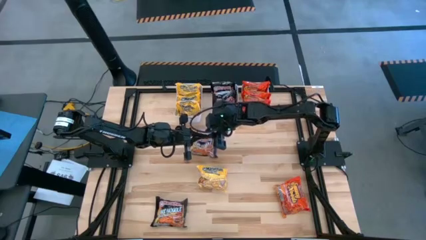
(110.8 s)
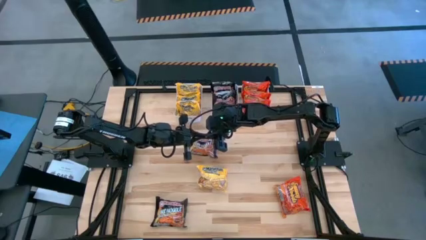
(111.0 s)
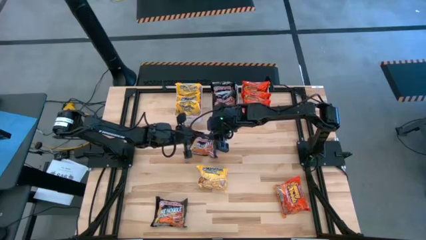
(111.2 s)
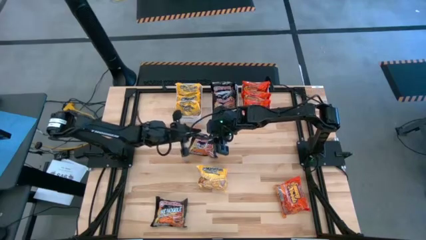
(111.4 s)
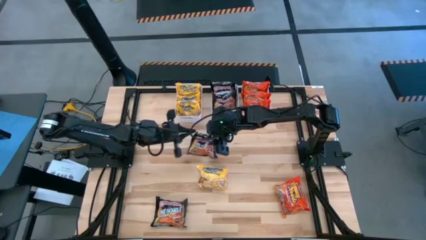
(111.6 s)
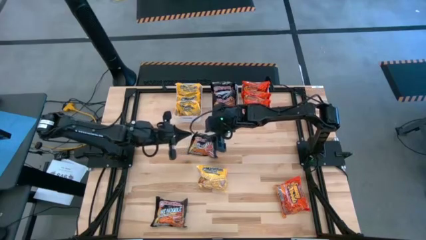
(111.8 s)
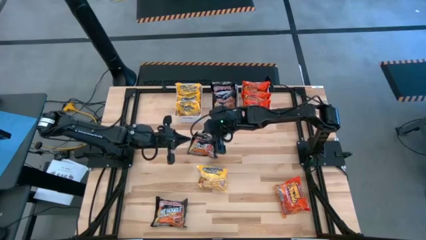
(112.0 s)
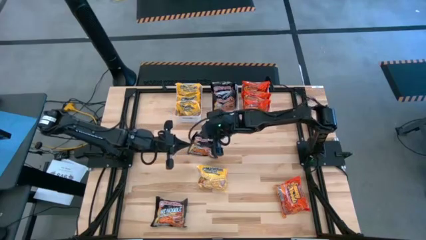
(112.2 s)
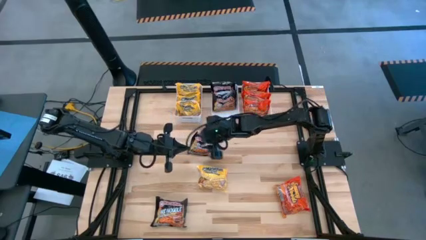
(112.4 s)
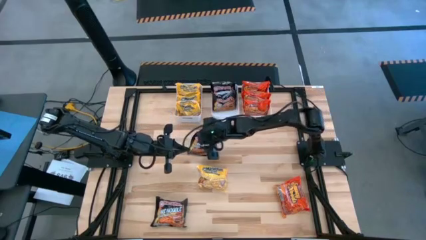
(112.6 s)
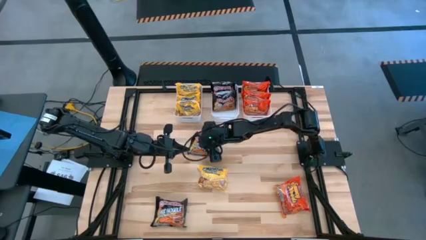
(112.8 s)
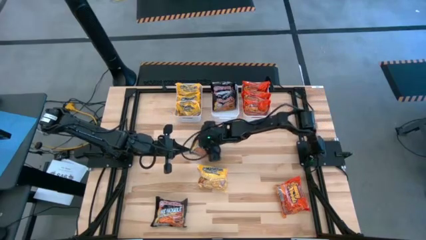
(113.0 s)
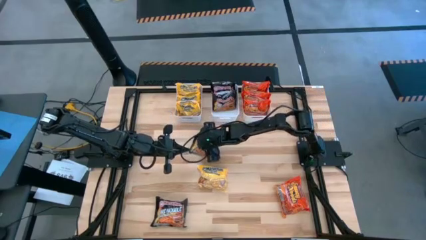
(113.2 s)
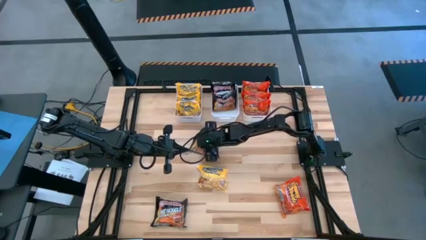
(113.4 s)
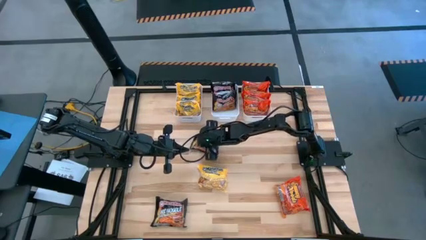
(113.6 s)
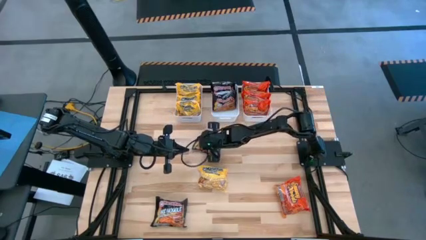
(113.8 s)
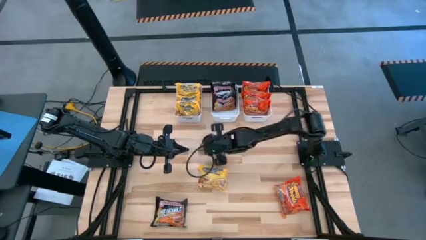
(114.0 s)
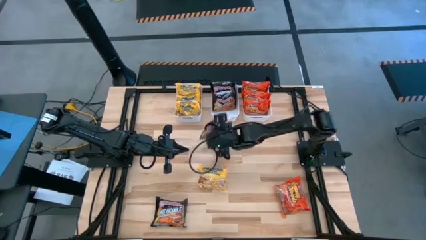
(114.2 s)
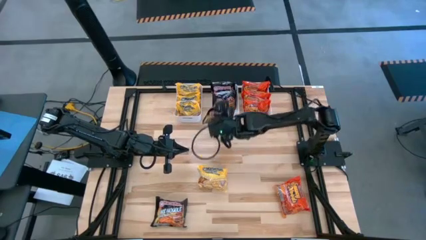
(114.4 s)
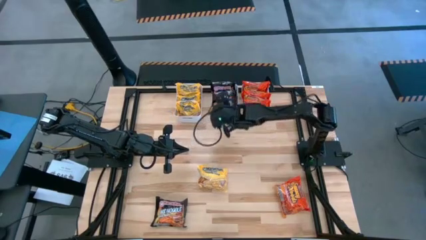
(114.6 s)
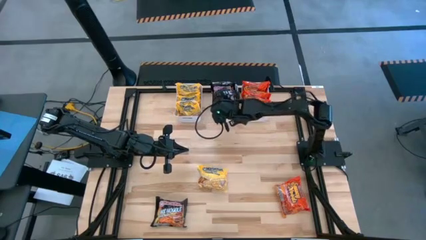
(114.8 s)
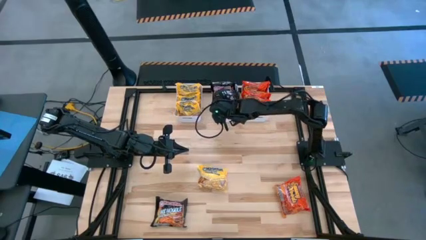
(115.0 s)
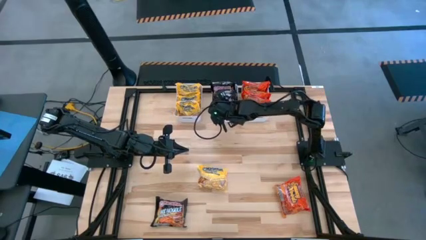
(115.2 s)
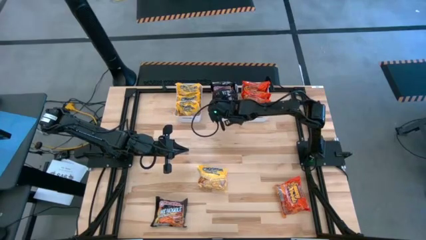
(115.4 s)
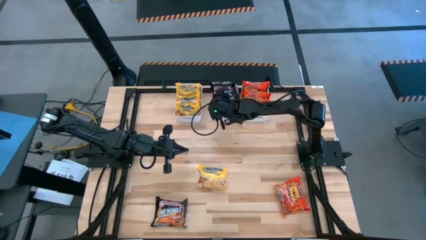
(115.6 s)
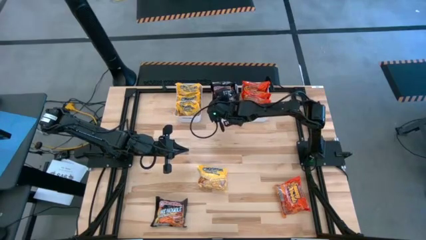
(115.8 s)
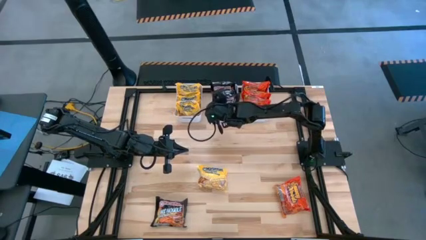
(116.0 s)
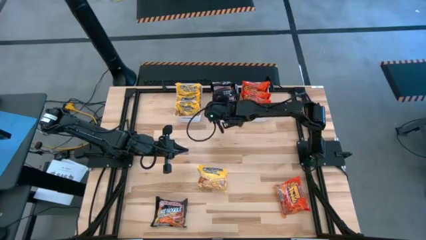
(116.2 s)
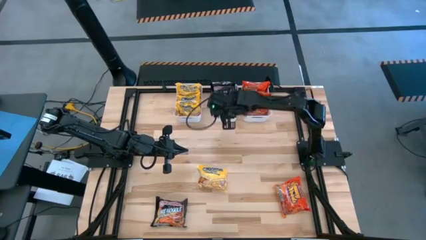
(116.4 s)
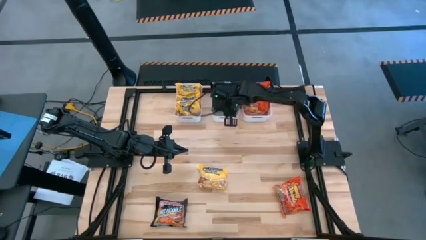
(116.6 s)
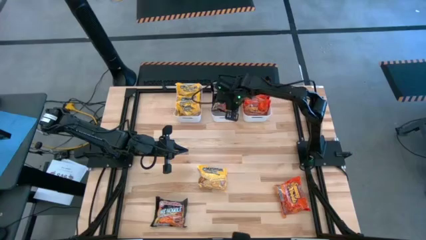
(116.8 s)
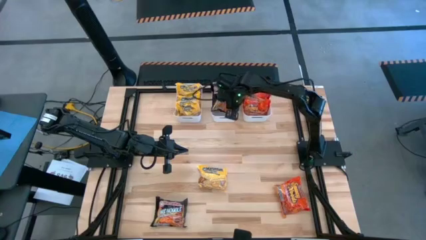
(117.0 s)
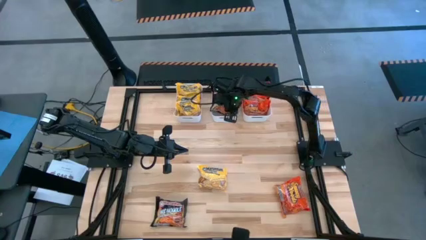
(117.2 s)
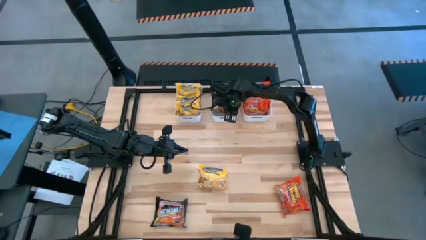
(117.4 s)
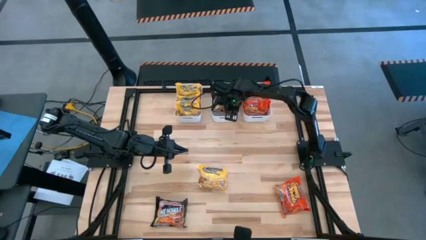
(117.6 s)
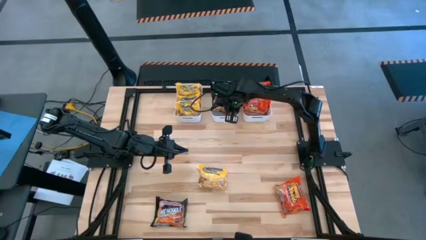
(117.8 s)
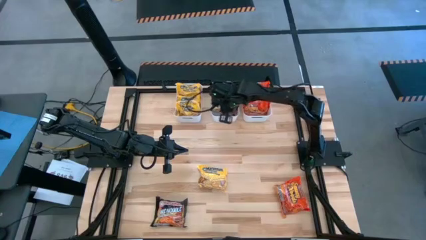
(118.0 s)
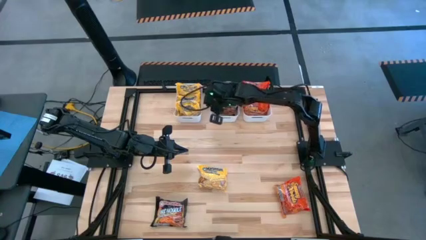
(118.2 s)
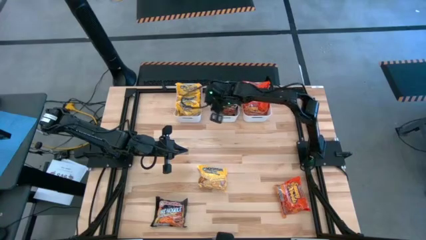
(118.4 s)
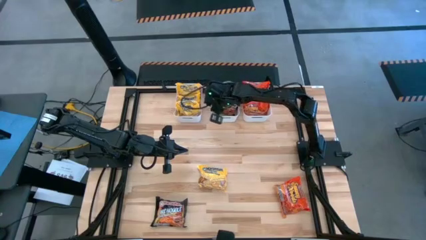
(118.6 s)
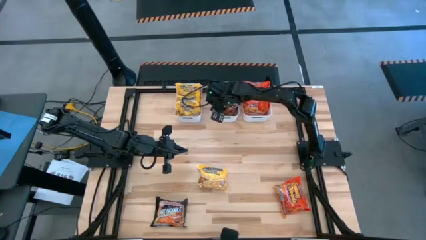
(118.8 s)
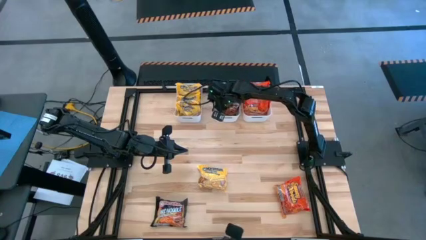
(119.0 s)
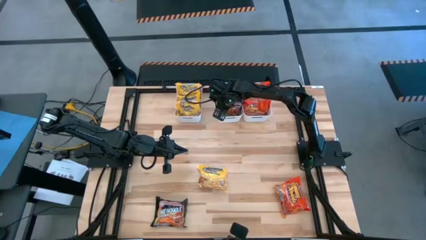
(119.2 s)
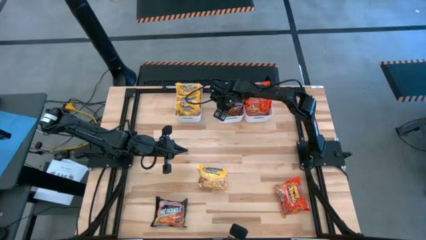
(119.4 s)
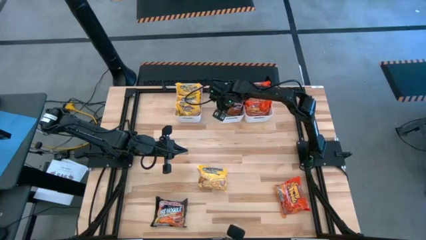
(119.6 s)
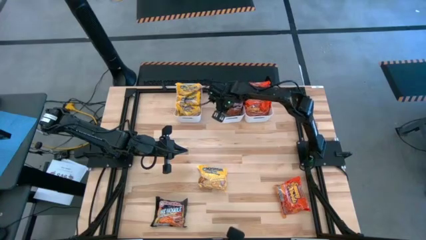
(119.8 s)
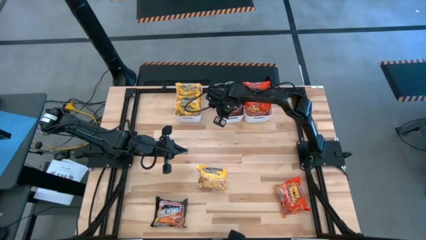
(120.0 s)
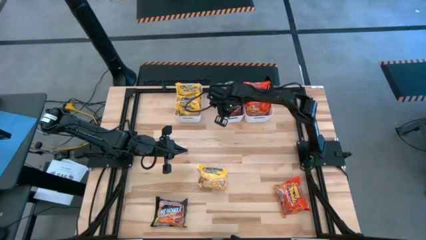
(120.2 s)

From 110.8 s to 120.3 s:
Task: Sort Maruchan noodles
Put the black noodle pack into the middle white bin

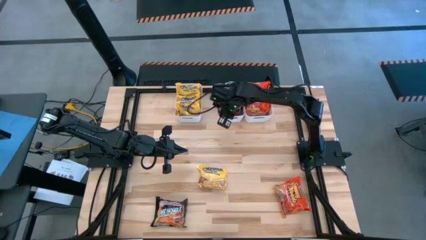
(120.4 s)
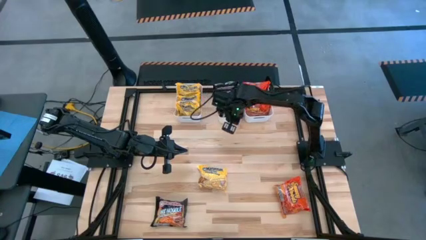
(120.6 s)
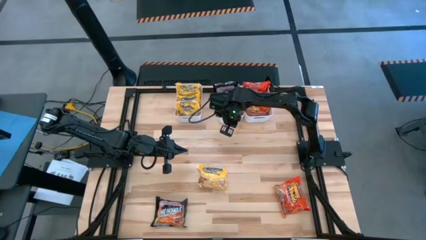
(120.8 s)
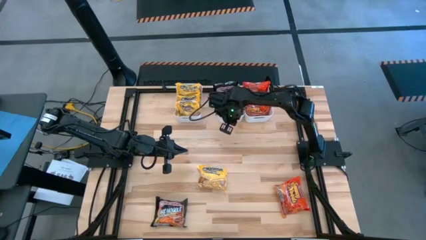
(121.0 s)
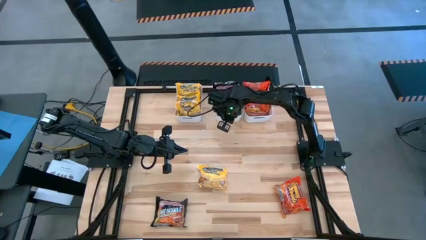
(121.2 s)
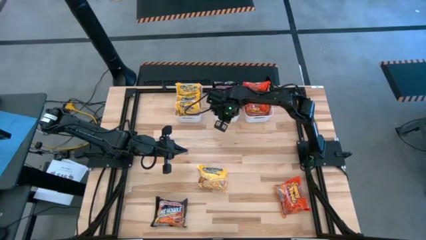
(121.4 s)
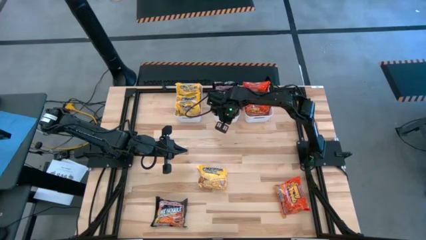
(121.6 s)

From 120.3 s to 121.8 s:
Adjust the middle white bin

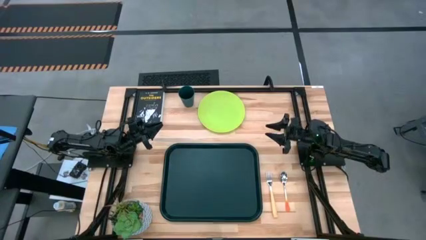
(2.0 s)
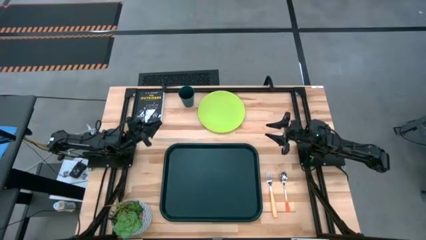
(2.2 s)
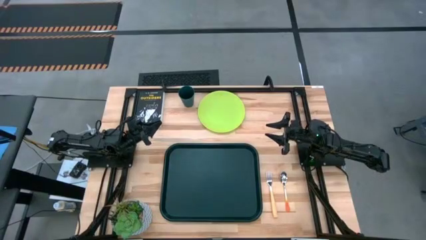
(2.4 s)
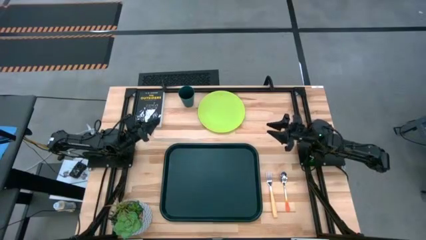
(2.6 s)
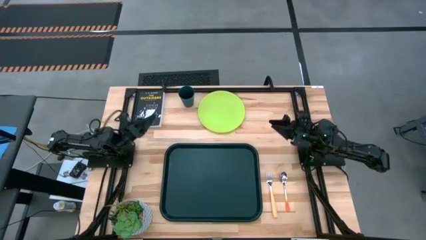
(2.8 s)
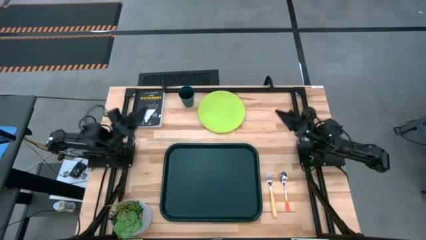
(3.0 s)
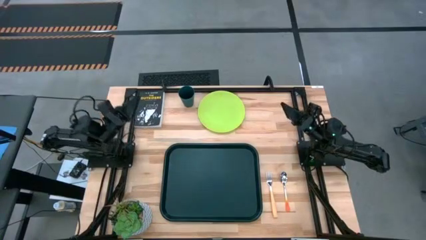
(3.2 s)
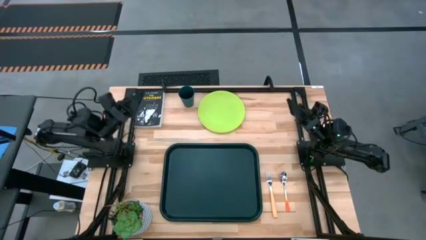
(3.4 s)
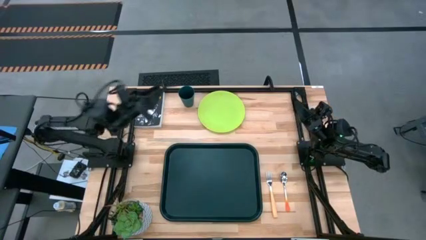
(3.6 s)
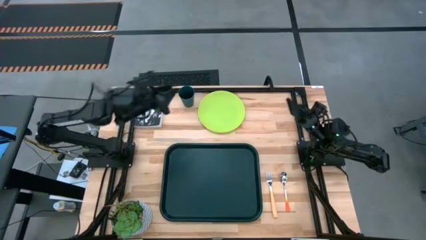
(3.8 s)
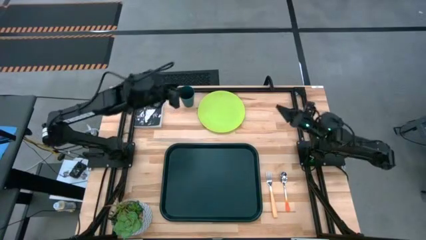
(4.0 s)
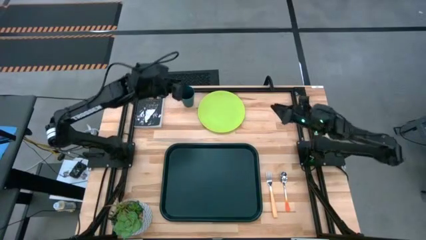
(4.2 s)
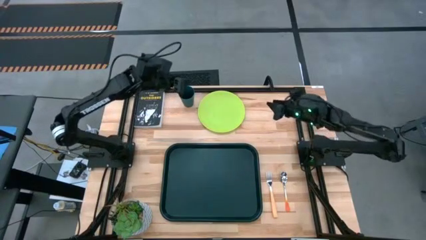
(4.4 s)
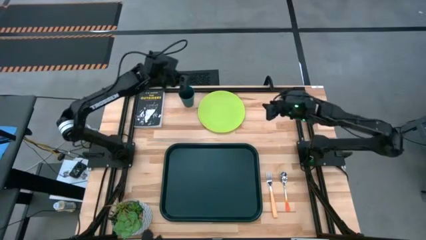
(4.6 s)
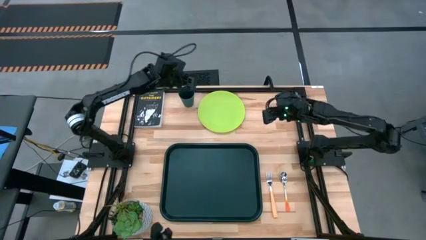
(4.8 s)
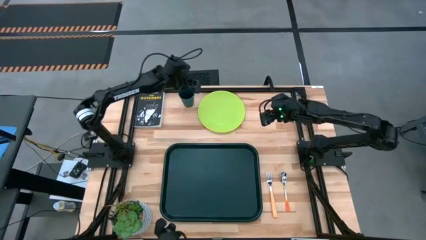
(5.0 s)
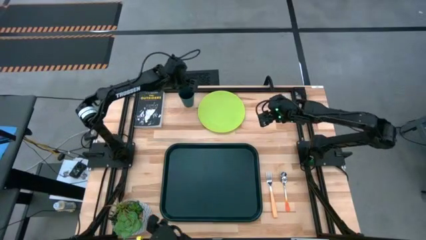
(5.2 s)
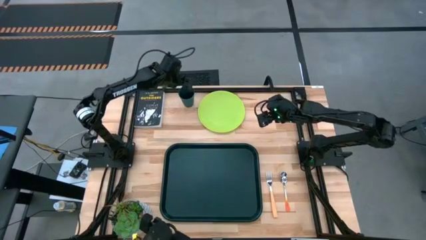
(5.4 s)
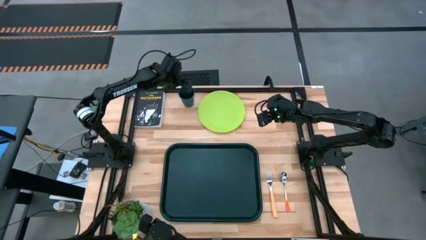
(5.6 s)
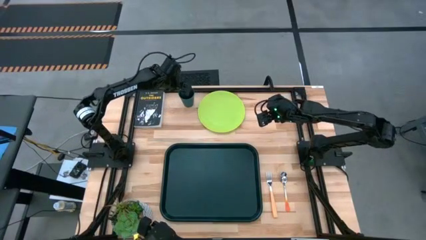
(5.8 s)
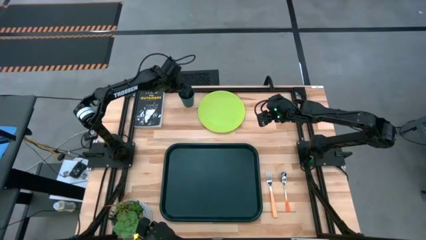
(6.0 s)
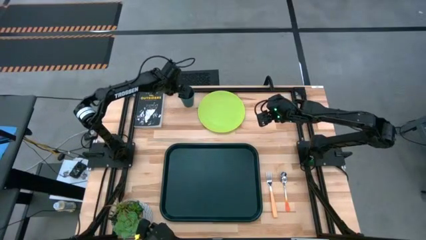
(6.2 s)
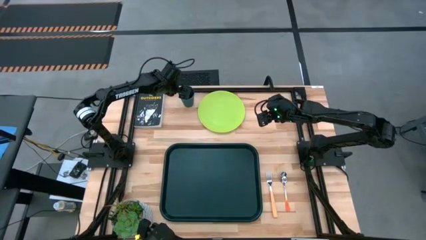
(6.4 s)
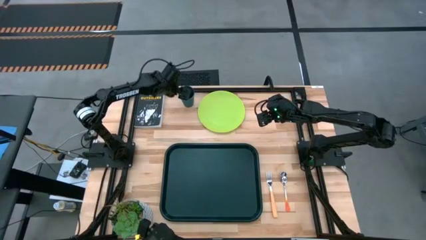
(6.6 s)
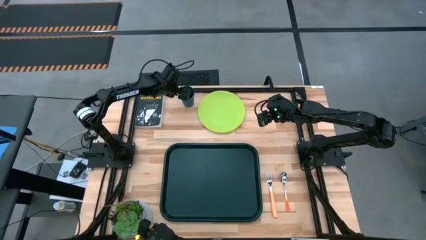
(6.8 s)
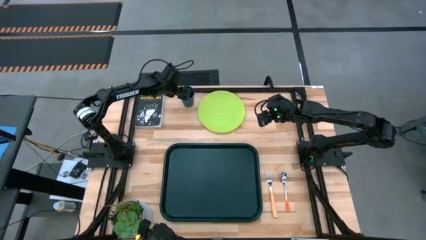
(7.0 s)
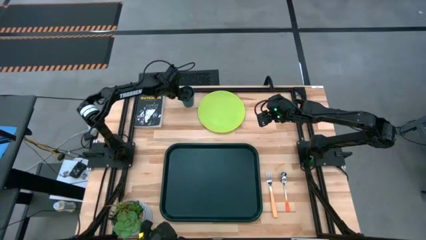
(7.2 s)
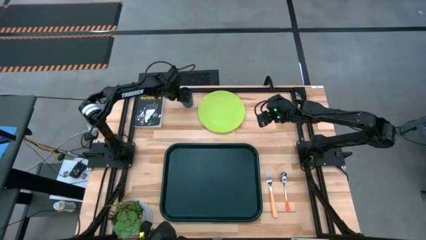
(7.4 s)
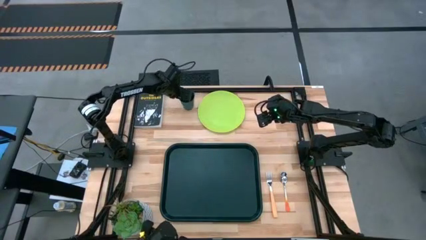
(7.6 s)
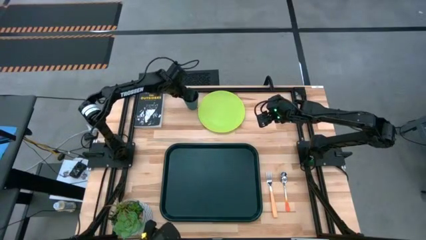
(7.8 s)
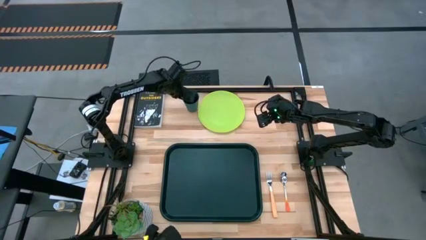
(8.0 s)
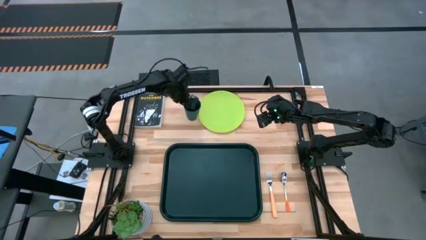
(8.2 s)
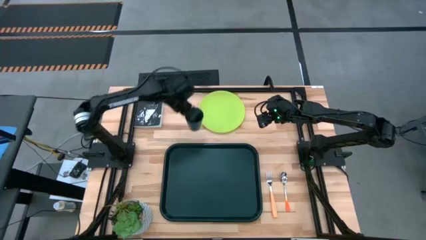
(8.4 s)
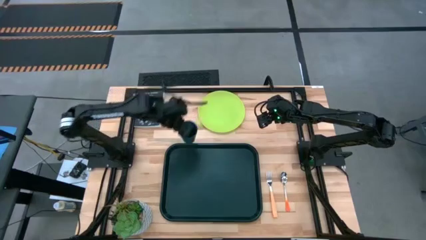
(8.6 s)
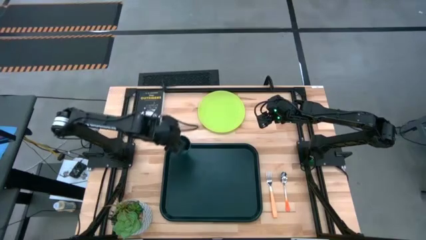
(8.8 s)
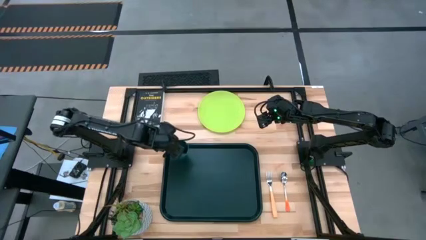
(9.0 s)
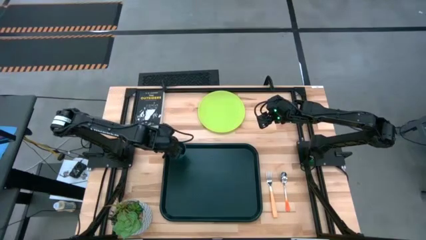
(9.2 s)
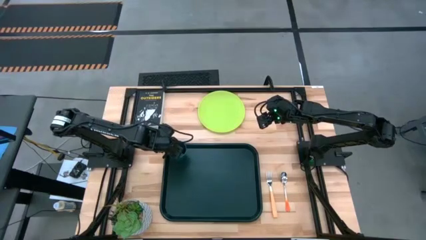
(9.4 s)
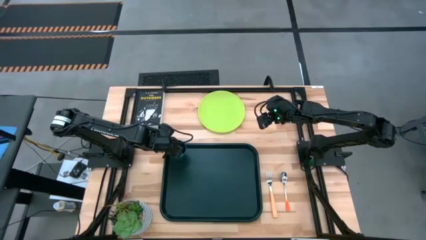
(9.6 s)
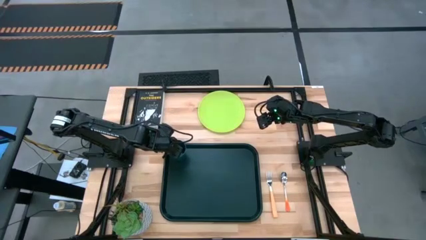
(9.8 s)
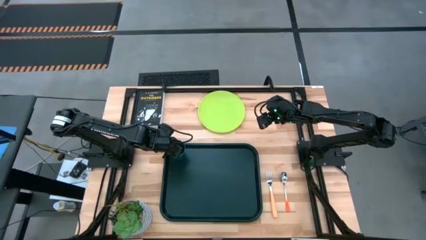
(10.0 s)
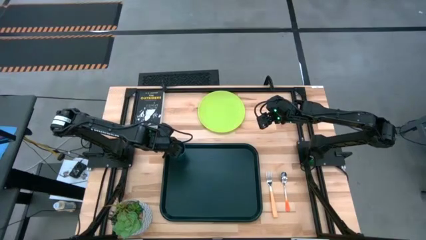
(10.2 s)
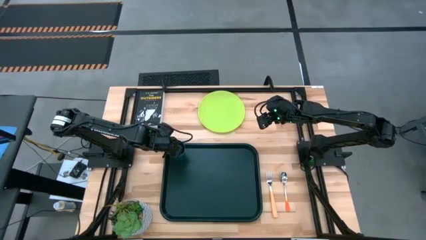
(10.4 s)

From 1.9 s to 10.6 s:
Task: Pick and place plate/cup/fork/spoon on tray
Put the blue cup on the black serving tray
